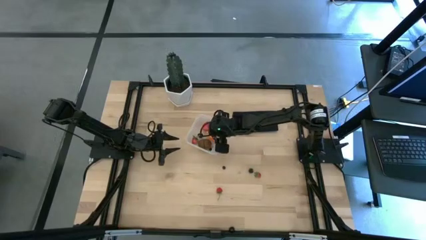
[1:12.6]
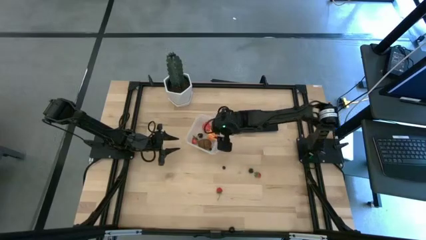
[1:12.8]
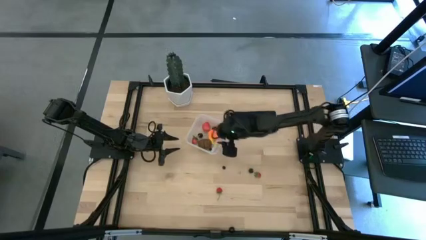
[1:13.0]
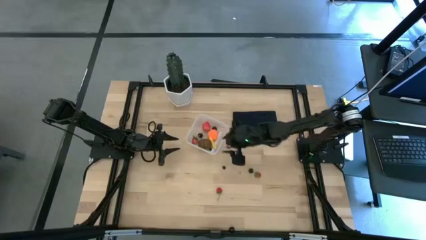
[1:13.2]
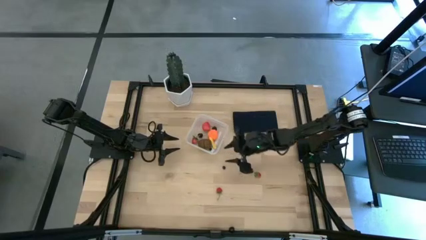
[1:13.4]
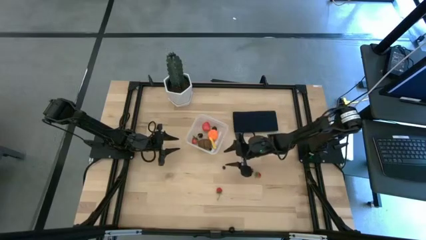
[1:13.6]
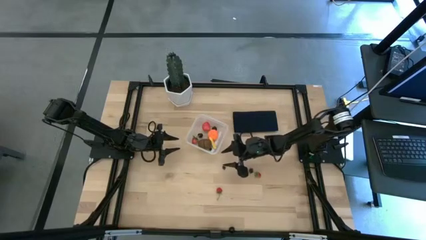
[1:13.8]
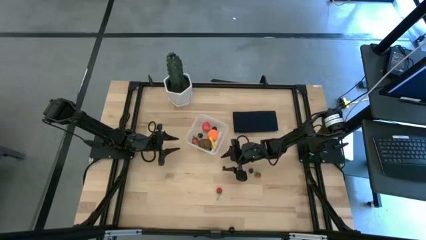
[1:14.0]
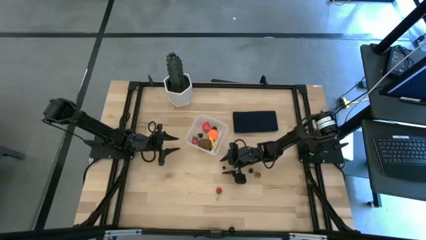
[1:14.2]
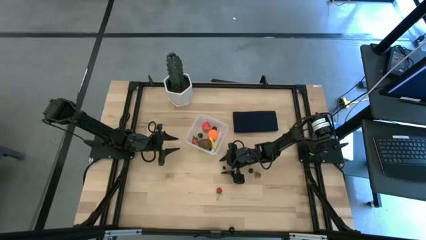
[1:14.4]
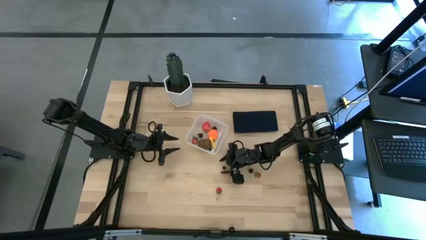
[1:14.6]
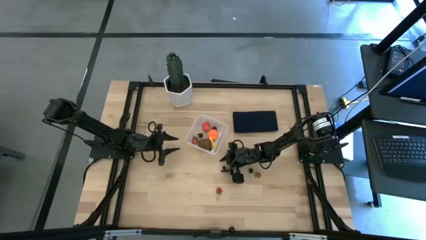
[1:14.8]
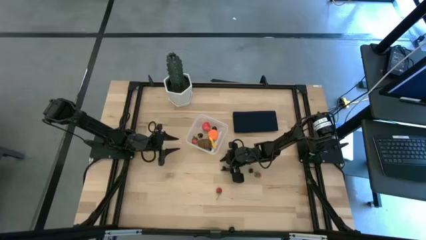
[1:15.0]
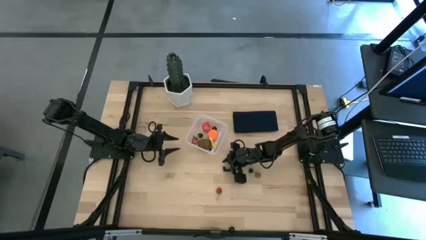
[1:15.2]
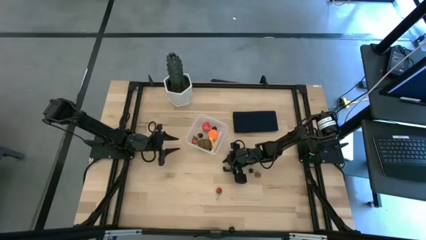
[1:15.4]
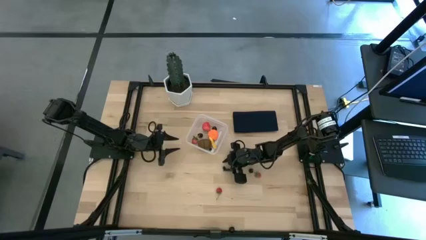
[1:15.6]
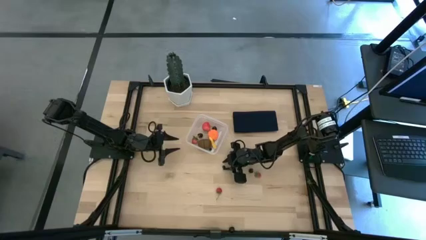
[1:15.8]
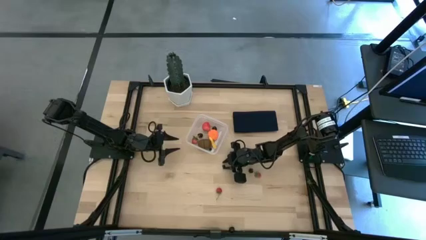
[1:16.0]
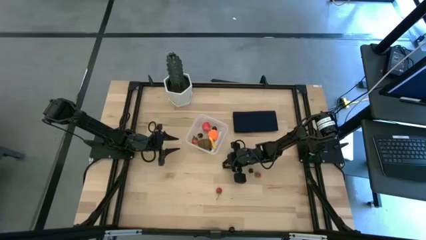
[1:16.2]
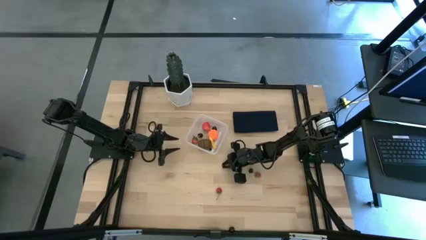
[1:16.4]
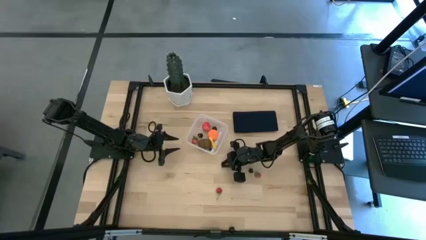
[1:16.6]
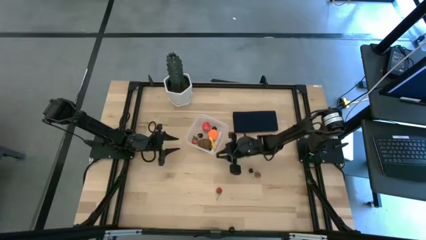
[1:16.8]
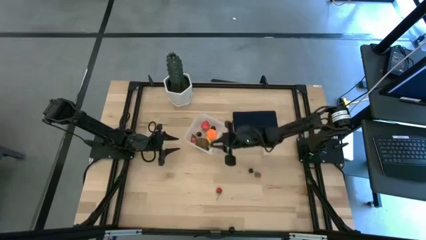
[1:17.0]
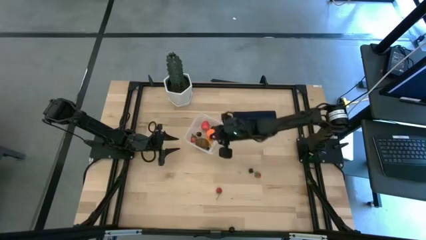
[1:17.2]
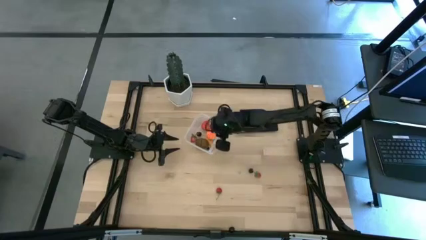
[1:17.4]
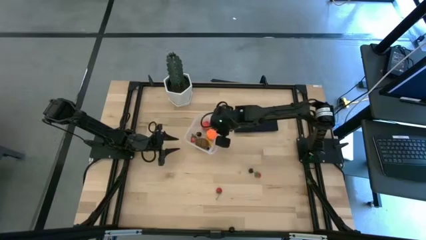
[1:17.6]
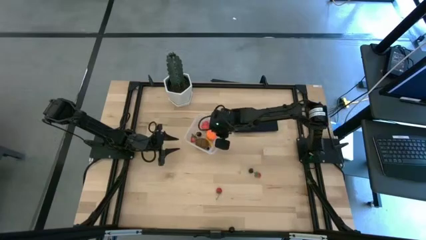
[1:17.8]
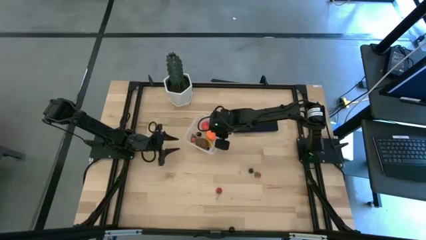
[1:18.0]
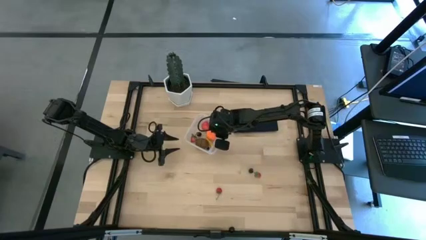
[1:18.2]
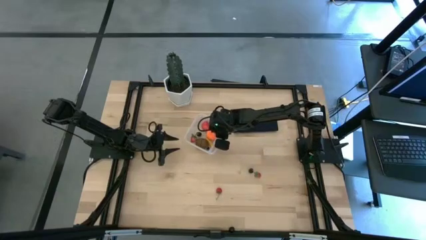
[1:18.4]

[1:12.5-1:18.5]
Task: Pick and placing Produce into tupperware
Put the blueberry into the transparent container

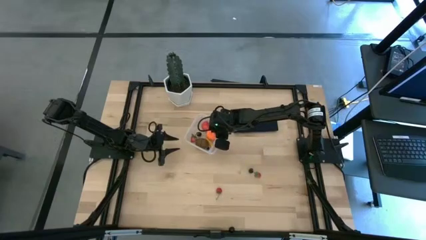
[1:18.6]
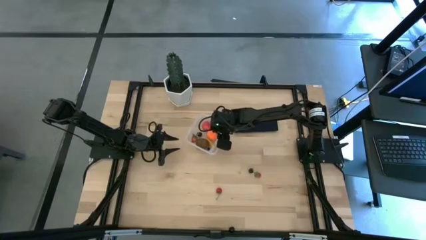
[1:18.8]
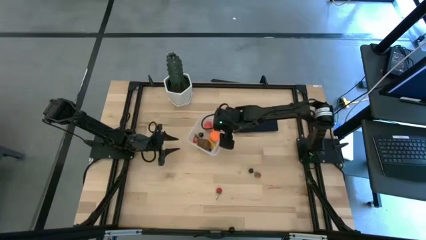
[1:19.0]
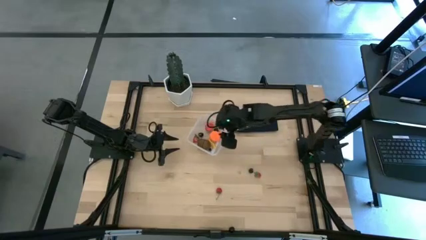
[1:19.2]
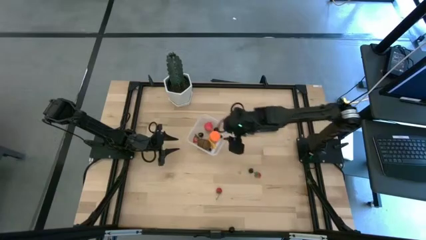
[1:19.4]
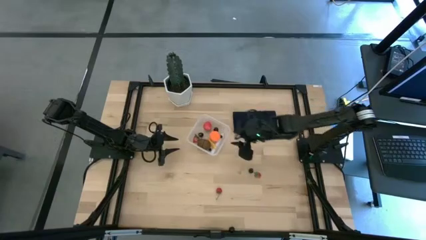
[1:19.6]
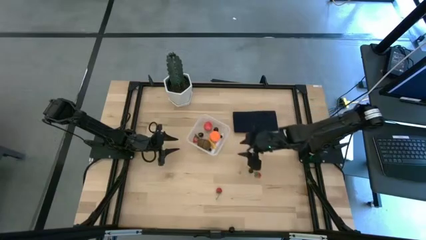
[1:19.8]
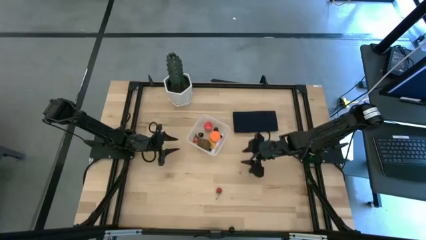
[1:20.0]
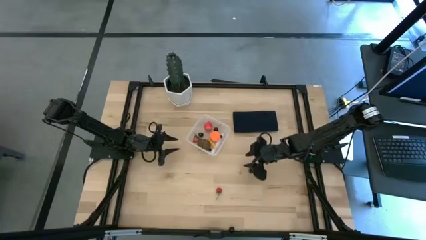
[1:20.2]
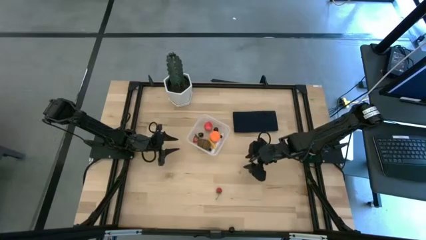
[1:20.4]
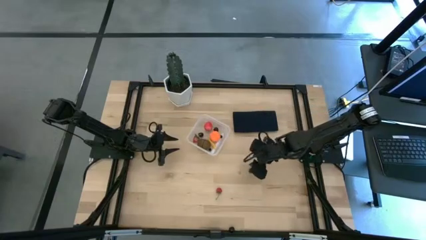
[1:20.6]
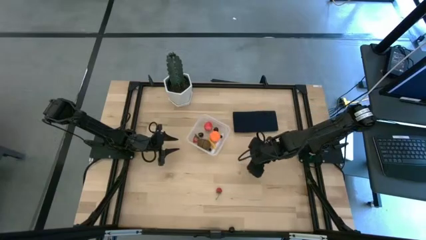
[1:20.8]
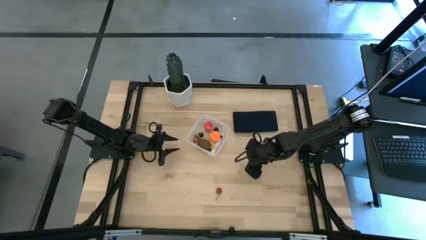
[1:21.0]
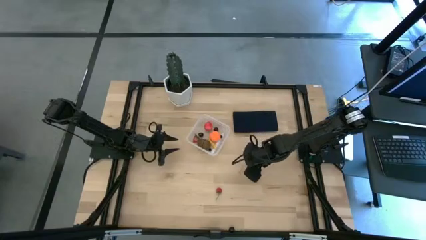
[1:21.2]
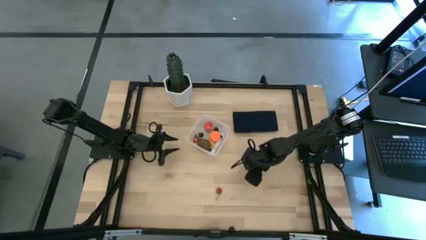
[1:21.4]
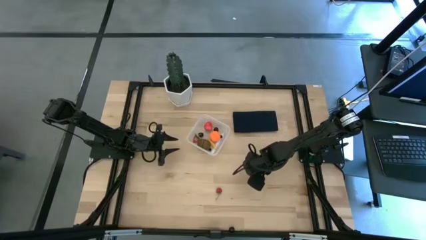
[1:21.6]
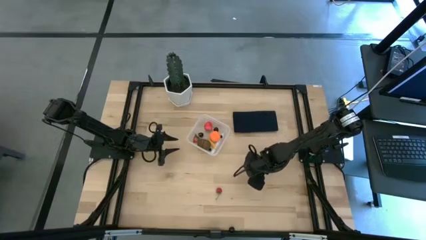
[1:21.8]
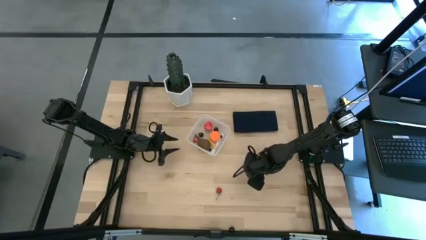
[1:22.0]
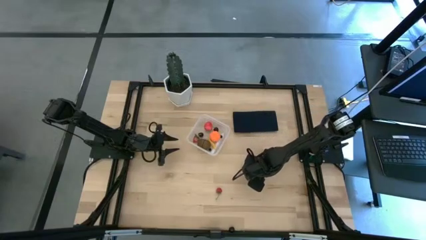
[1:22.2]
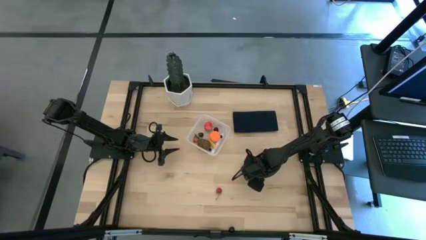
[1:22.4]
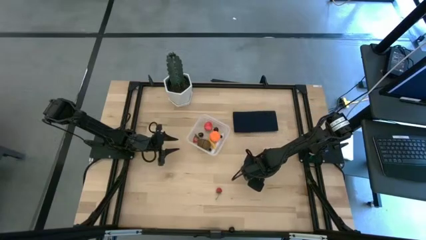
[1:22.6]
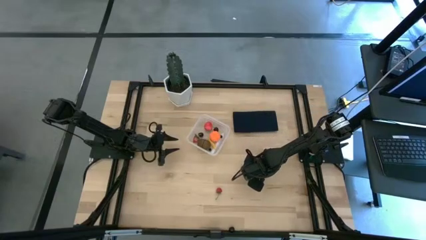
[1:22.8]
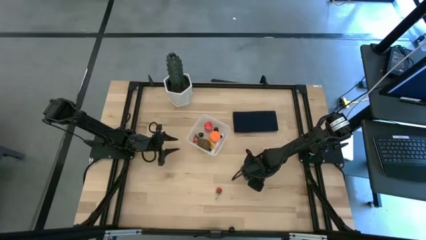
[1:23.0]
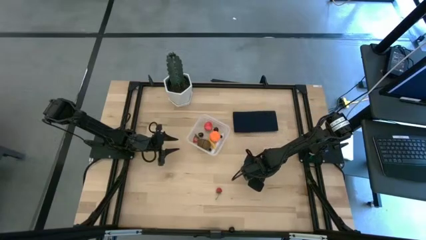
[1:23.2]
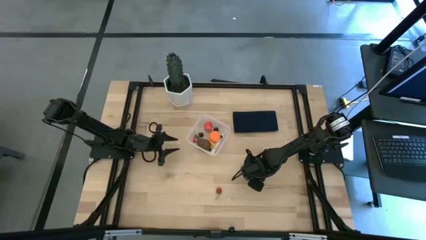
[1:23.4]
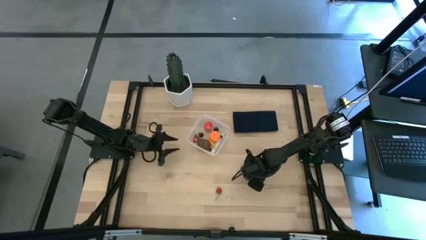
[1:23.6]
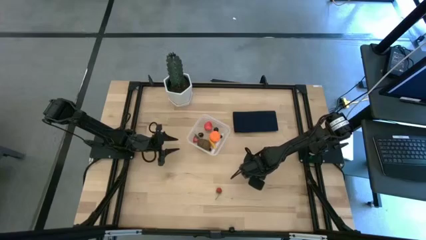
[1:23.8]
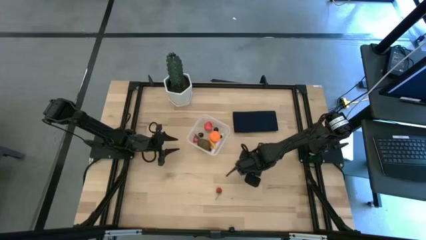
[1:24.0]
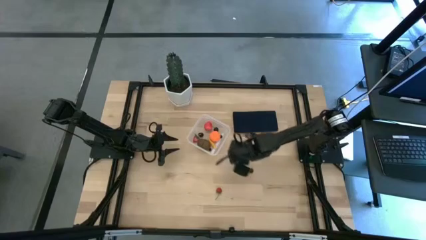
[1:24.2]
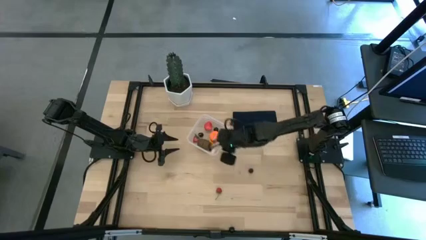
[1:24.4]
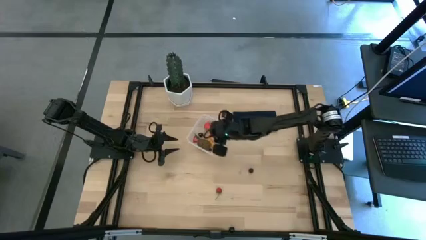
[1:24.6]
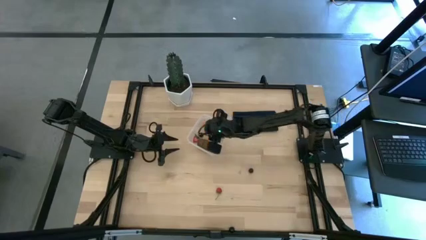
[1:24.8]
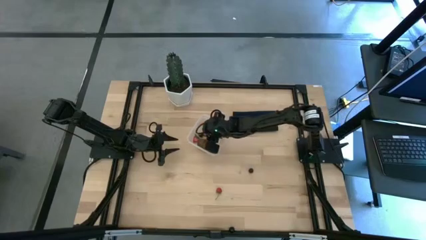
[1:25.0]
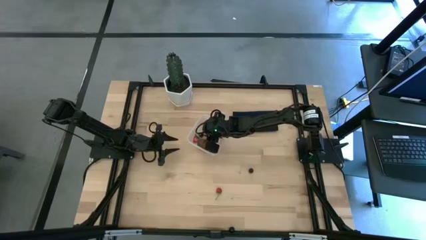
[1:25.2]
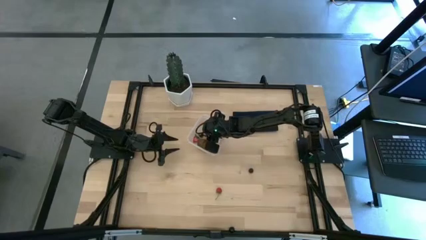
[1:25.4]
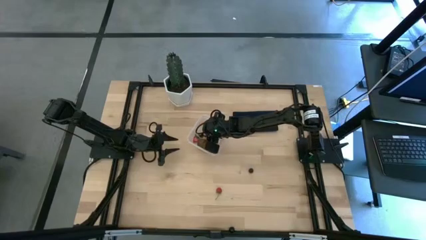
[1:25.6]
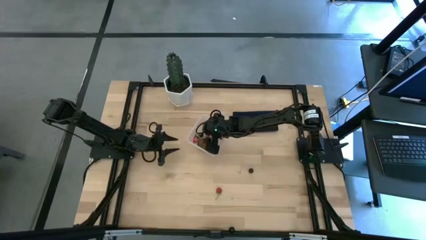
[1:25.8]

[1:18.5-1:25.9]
Put the right red strawberry into the transparent container

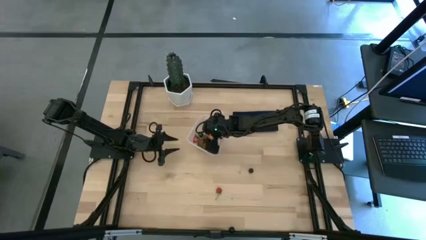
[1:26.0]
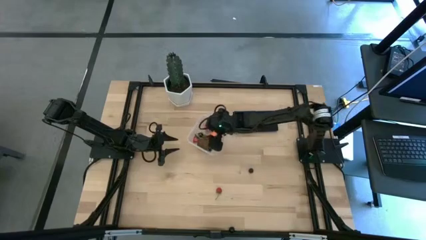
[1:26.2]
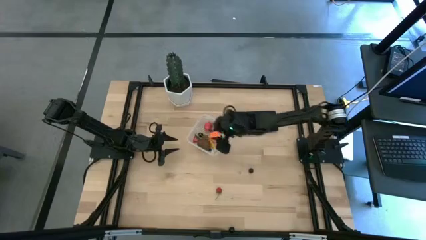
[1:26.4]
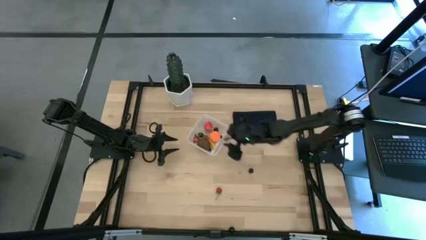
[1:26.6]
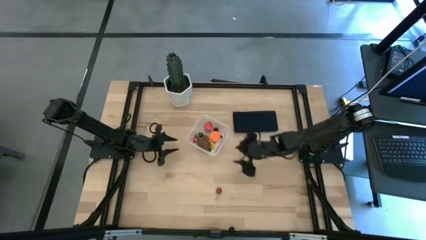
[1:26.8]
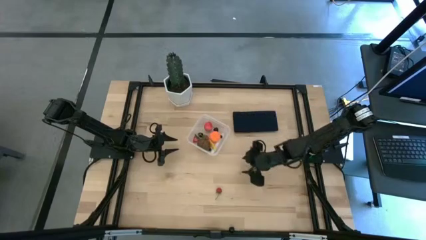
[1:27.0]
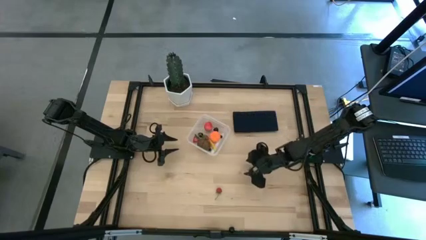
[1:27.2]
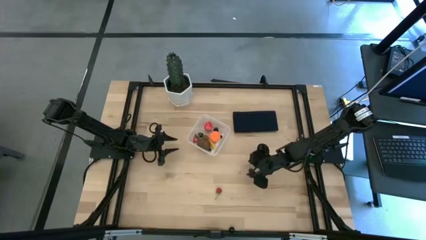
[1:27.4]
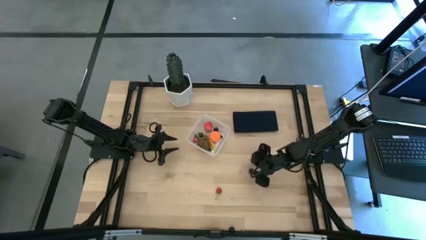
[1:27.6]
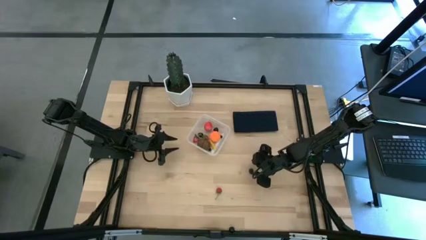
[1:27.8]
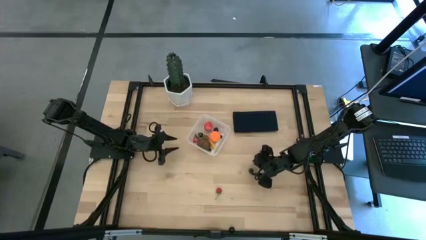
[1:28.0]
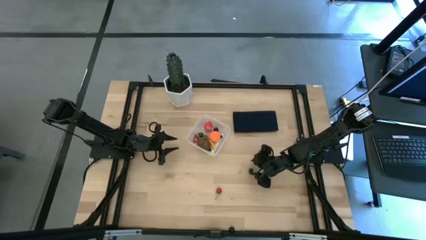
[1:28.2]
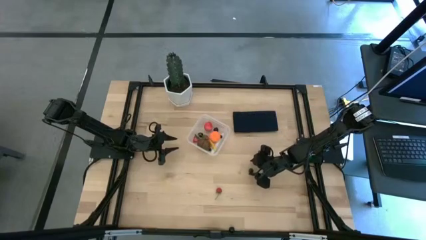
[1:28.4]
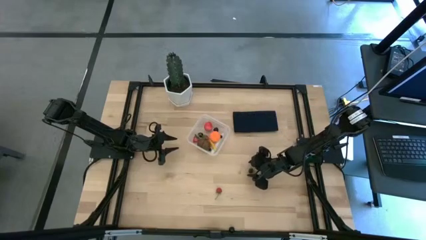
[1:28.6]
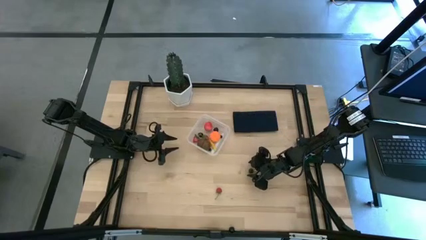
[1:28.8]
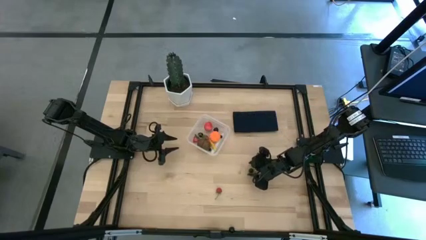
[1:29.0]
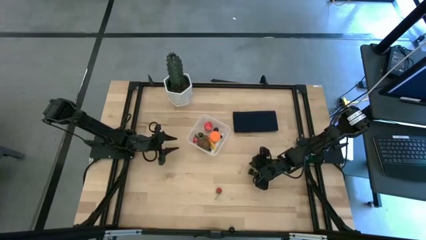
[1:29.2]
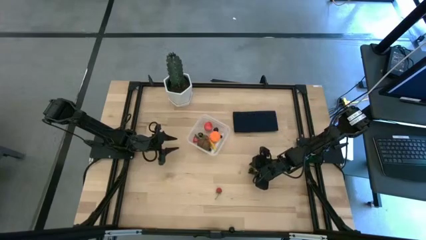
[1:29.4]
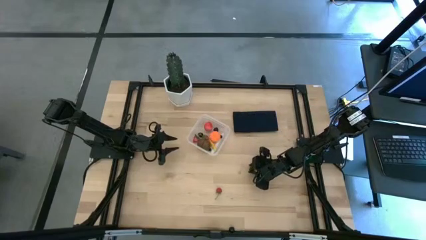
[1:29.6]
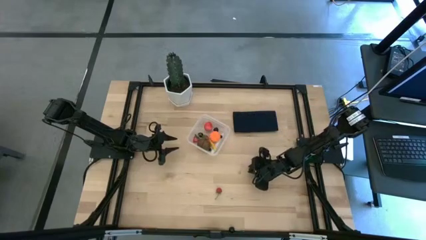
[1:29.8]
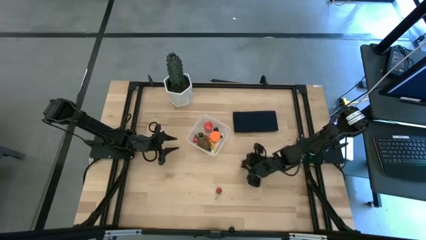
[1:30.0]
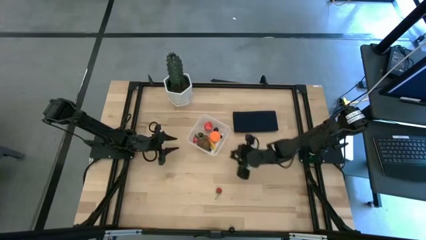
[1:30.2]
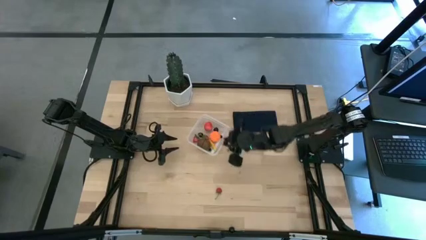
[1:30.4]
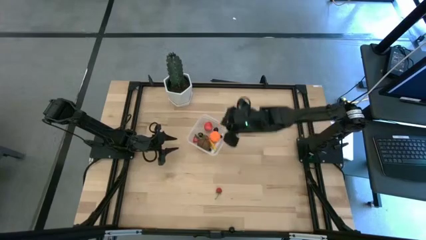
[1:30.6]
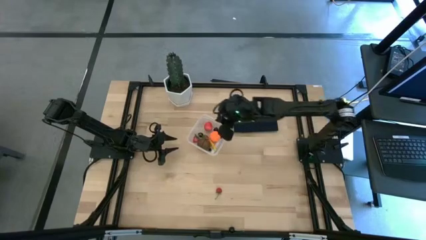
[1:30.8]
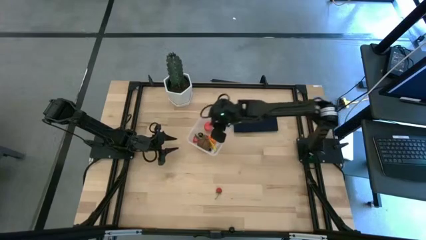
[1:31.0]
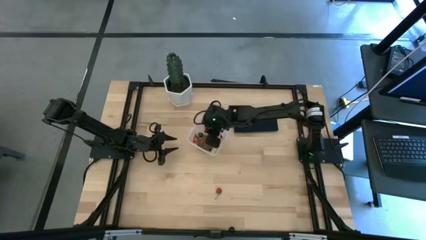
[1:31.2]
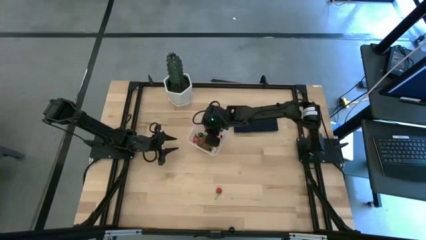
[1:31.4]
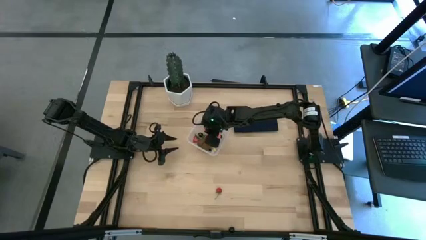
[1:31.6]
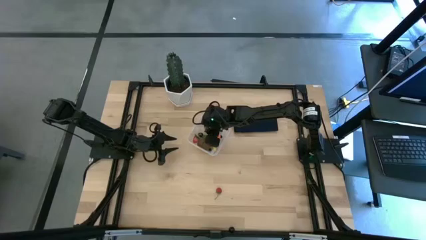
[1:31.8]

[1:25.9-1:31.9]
Put the blackberry into the transparent container
